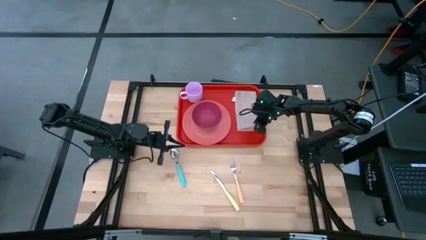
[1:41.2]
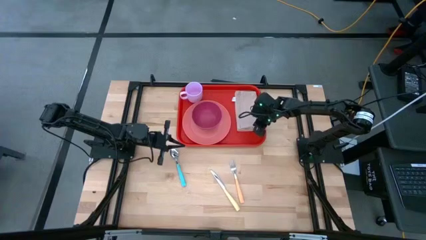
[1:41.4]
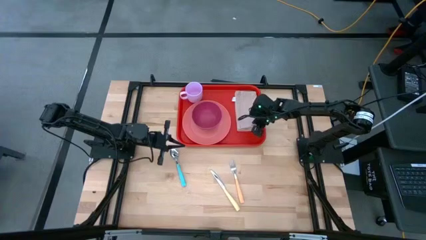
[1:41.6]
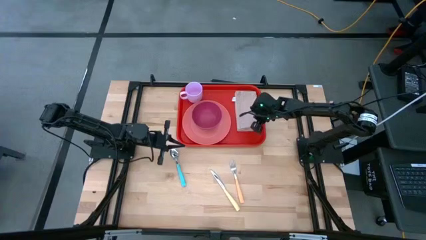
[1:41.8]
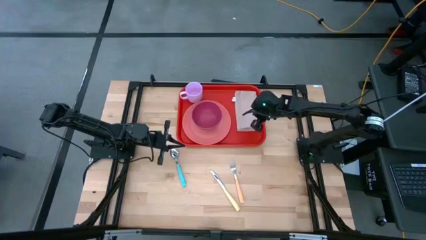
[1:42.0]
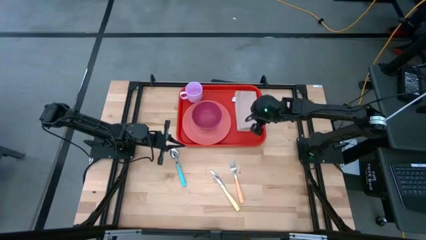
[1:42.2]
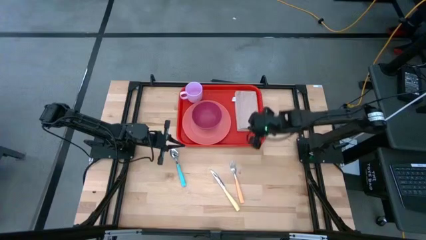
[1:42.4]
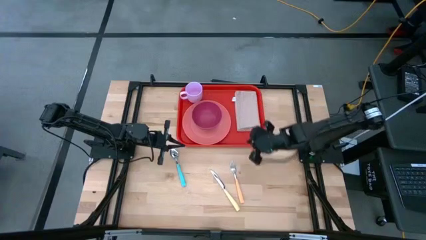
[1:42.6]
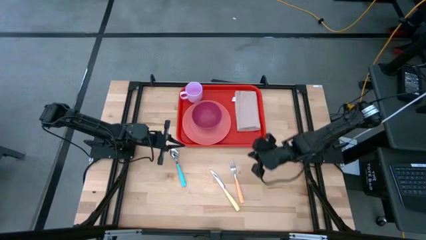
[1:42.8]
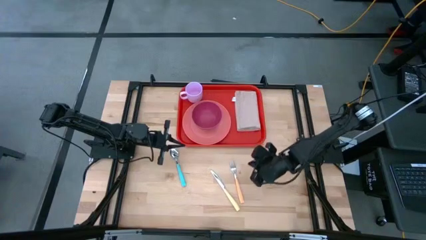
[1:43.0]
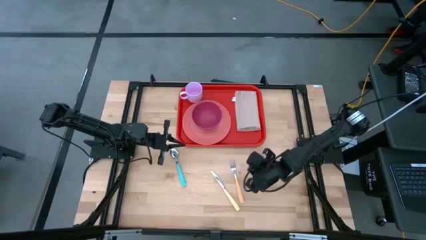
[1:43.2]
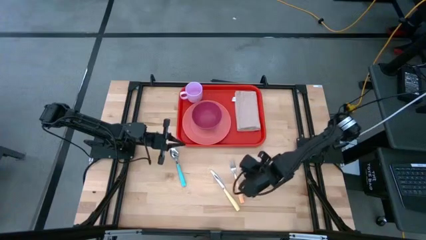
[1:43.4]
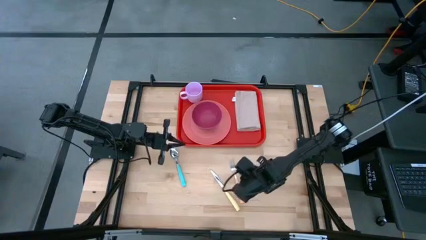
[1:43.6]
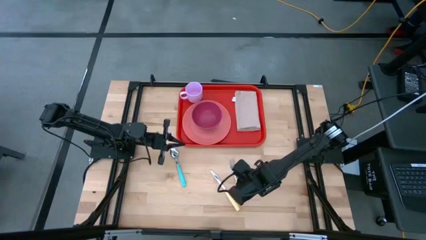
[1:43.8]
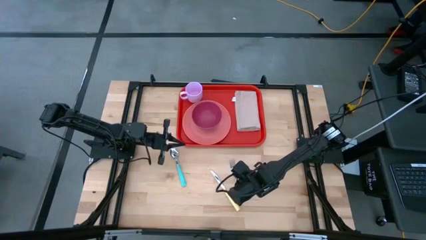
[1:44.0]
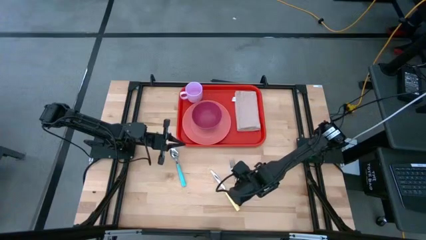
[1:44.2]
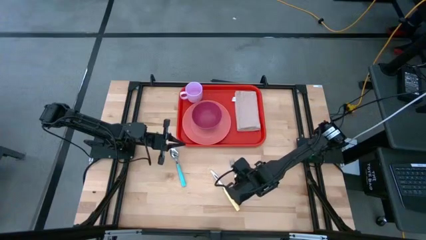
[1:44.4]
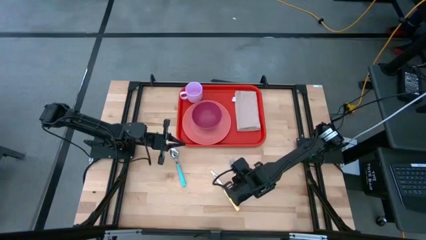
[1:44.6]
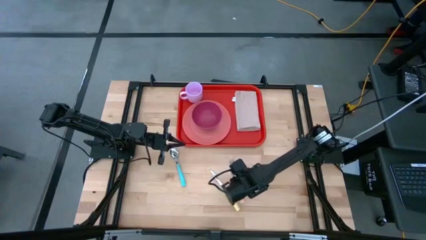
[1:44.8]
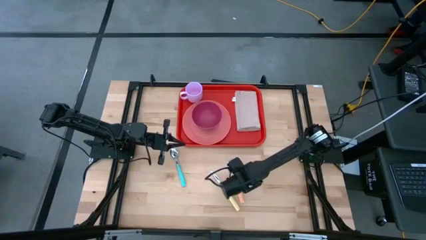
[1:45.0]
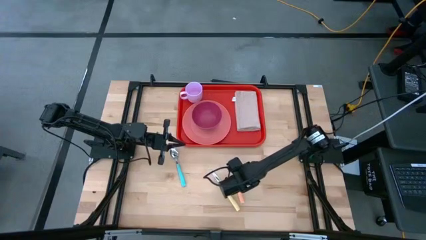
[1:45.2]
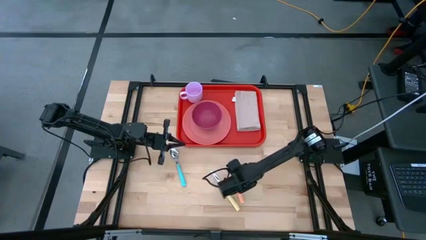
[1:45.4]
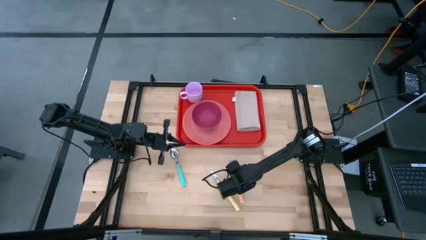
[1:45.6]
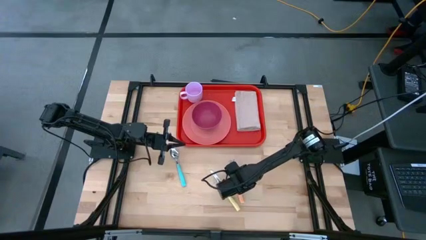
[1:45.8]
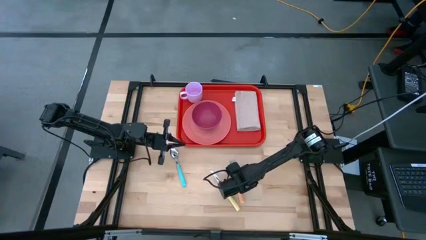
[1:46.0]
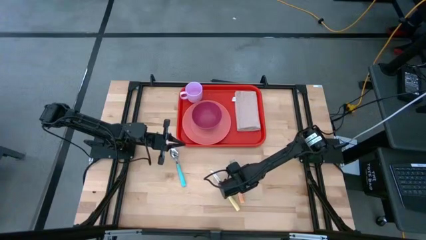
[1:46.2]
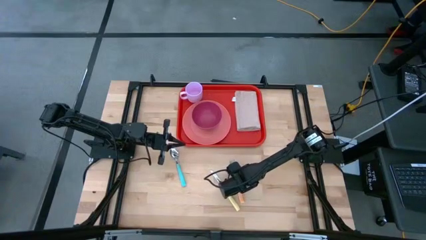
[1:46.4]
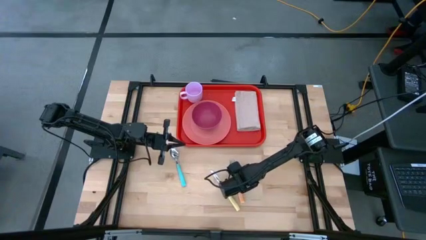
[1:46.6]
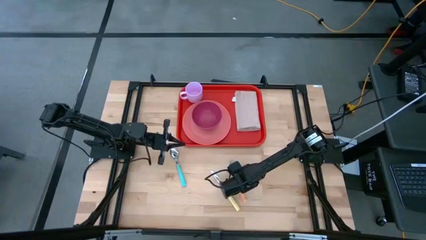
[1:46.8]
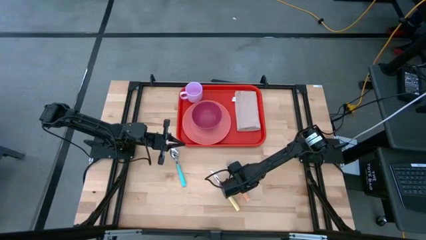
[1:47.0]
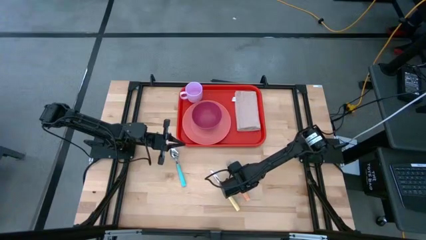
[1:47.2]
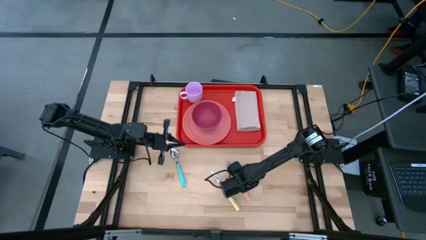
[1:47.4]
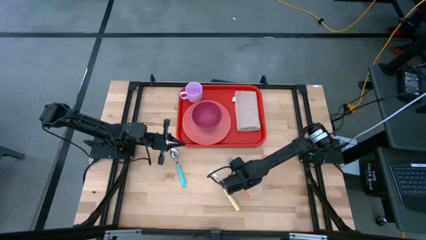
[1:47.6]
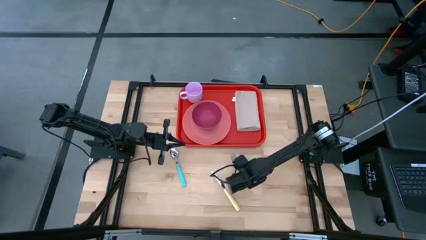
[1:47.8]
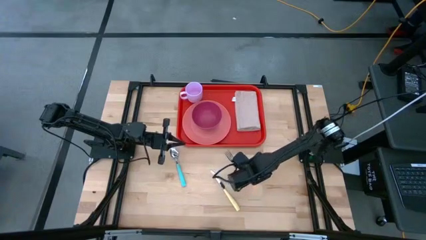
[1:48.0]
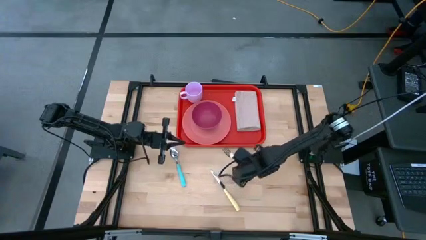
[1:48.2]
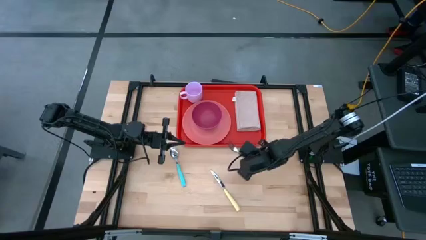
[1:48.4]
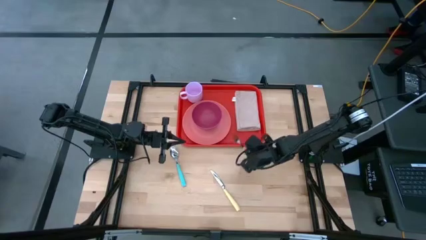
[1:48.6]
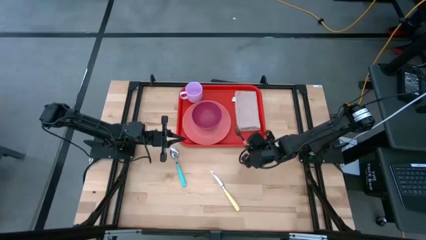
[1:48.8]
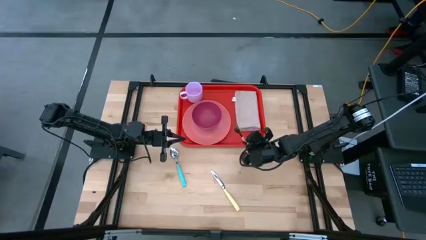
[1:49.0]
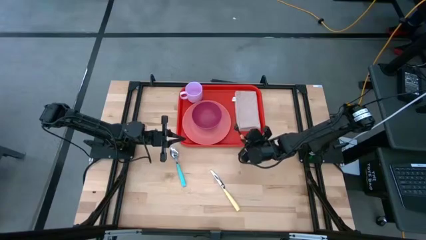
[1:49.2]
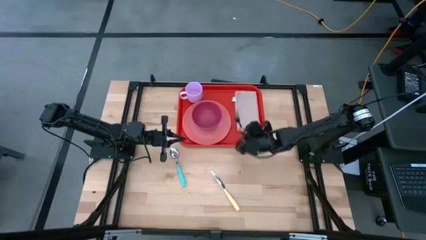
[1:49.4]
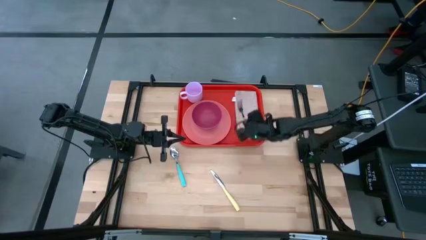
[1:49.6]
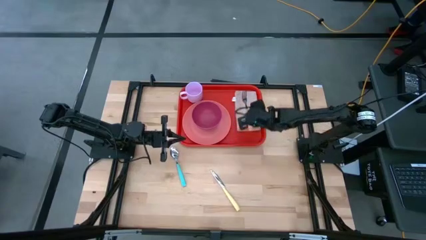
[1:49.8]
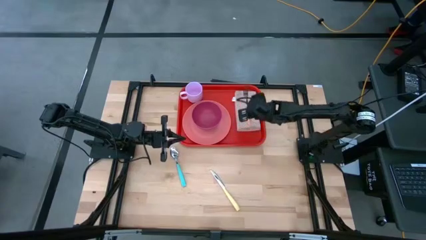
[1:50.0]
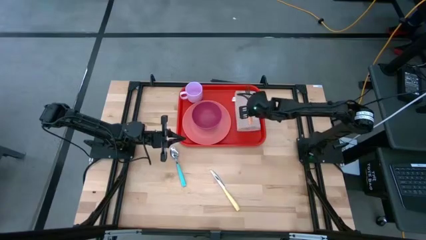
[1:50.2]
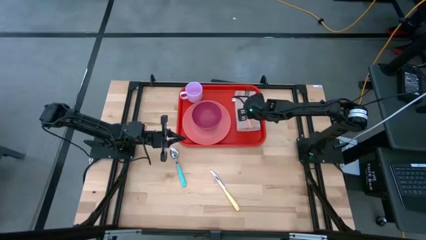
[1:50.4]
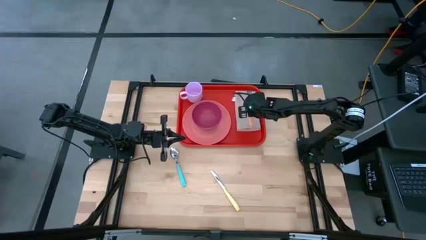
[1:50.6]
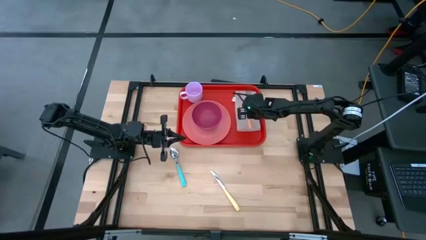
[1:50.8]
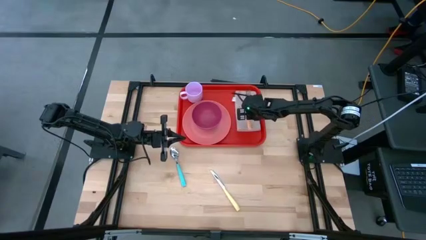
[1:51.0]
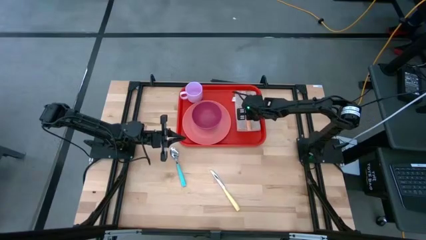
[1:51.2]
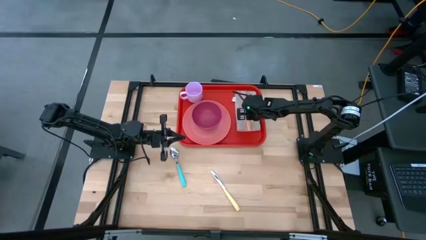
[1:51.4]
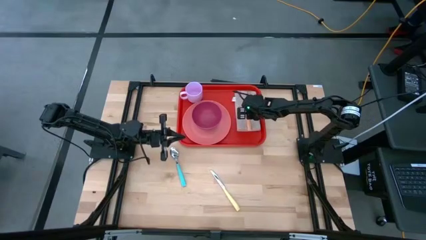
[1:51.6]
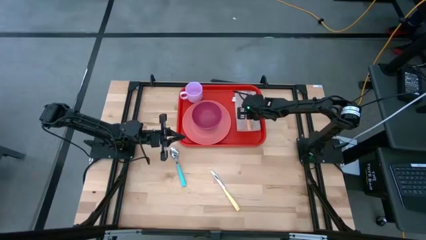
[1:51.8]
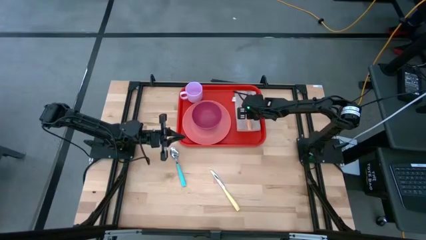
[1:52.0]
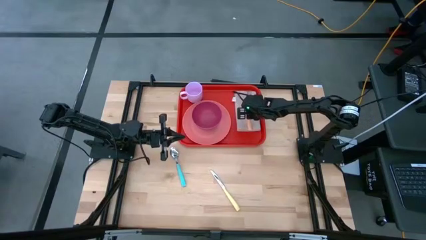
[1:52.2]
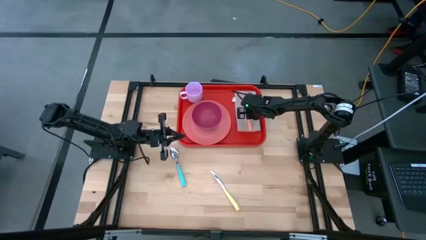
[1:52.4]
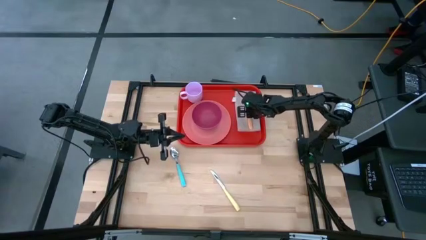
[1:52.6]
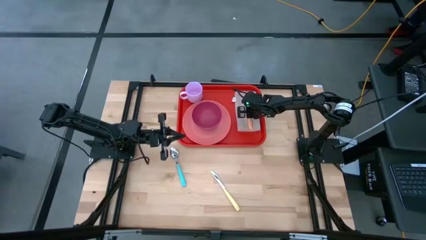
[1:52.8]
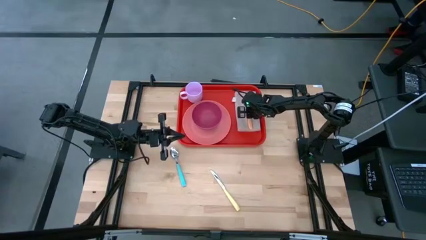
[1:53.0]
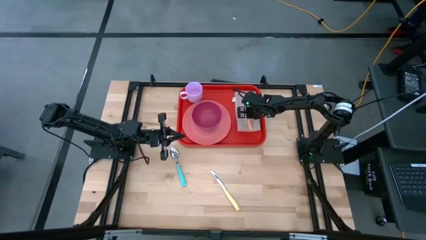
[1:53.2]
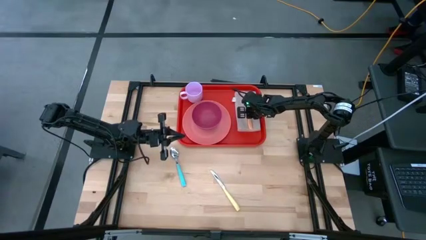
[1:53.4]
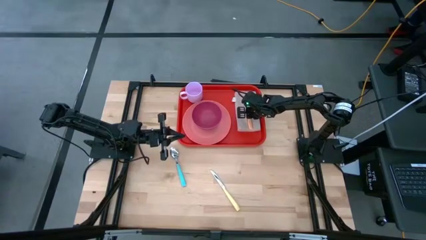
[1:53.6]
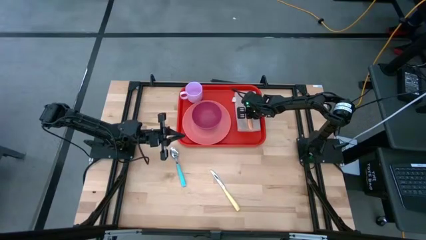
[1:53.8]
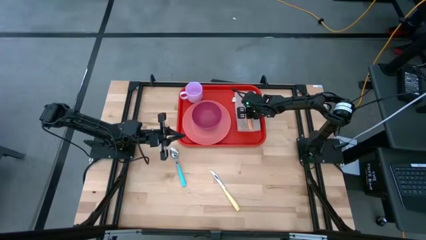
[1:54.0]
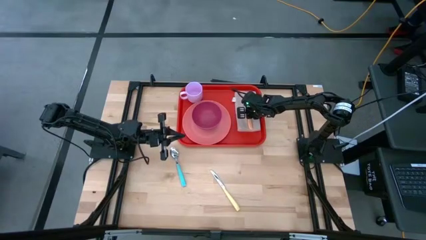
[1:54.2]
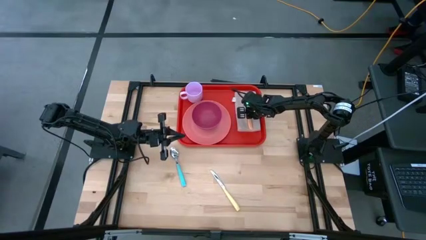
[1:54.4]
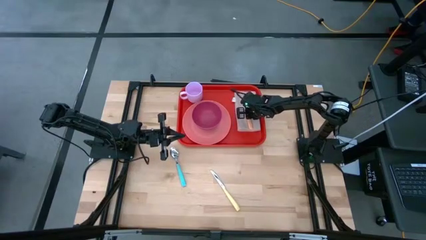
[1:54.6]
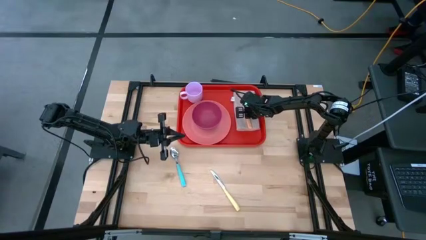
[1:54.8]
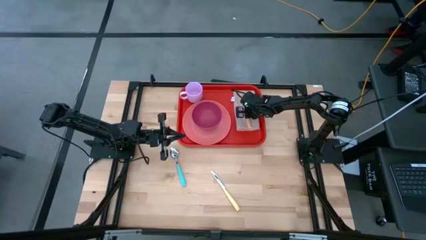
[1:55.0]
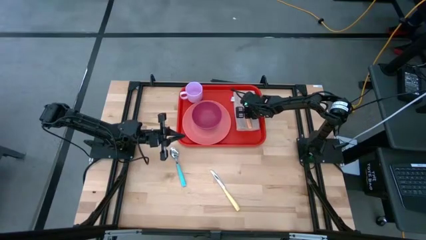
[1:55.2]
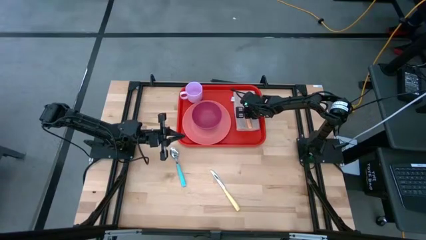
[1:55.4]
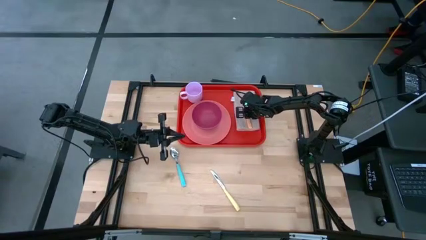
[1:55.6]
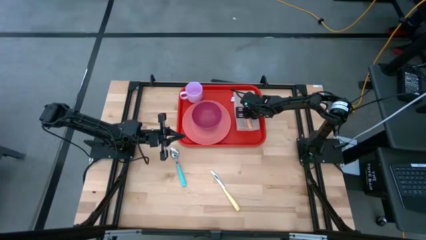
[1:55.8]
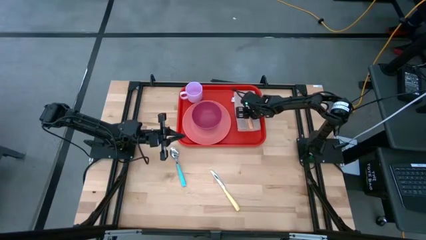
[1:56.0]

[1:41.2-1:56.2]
Task: Set up tray
Put the orange fork on the light brown table napkin on the red tray
